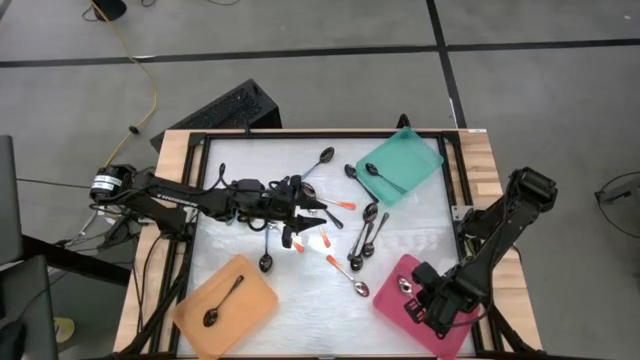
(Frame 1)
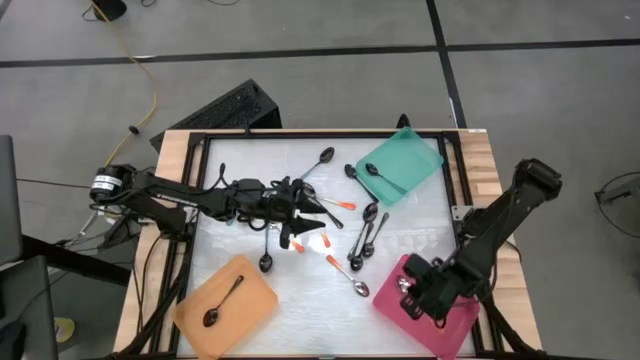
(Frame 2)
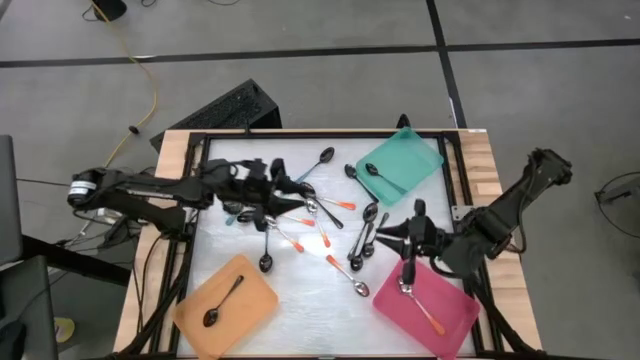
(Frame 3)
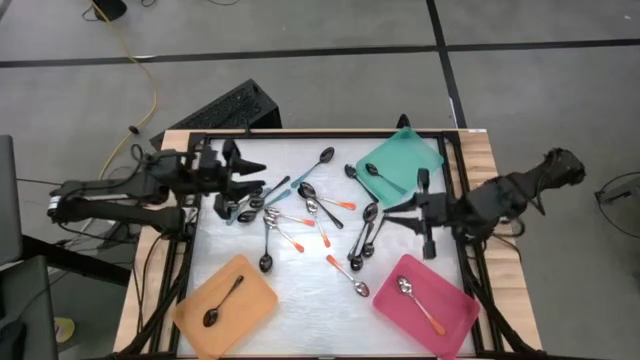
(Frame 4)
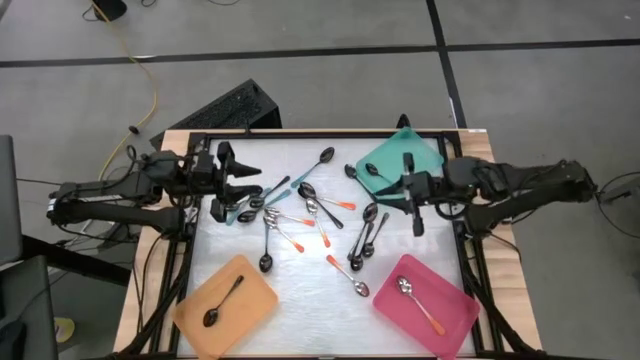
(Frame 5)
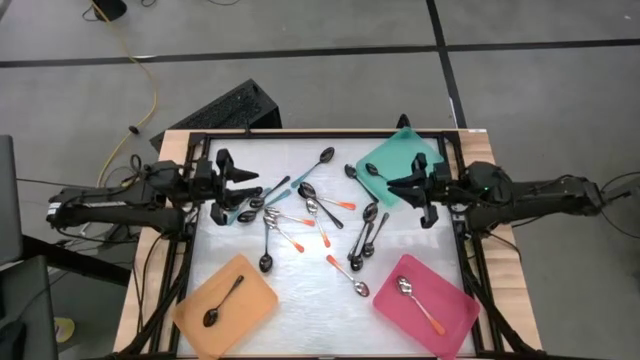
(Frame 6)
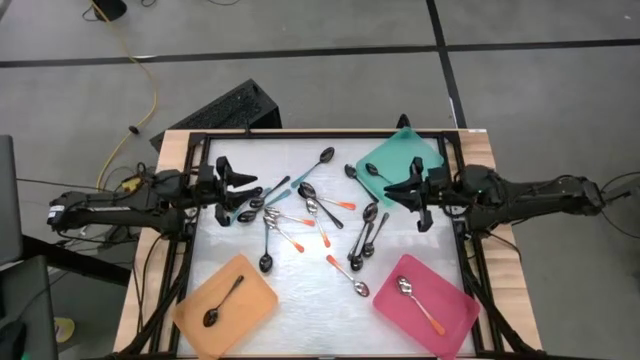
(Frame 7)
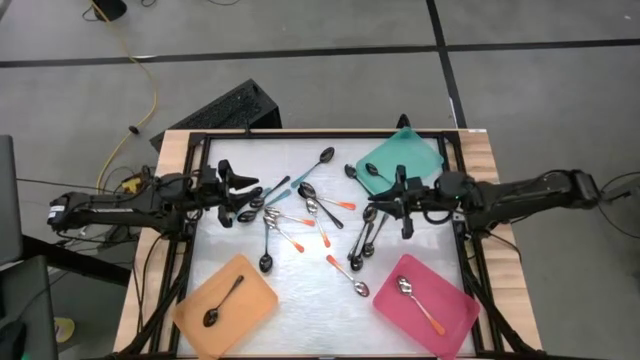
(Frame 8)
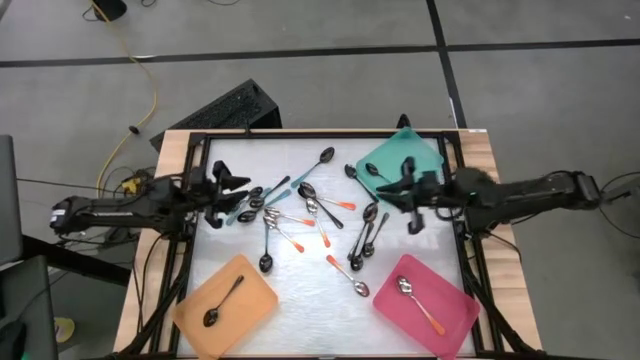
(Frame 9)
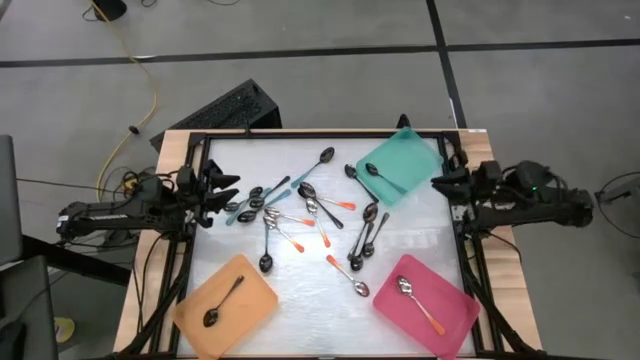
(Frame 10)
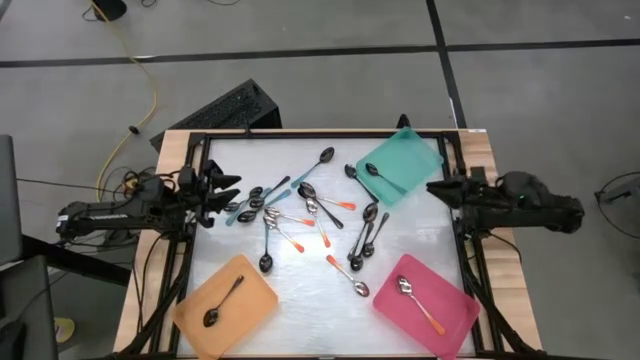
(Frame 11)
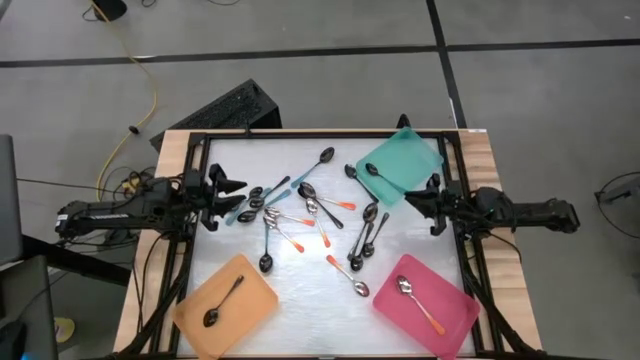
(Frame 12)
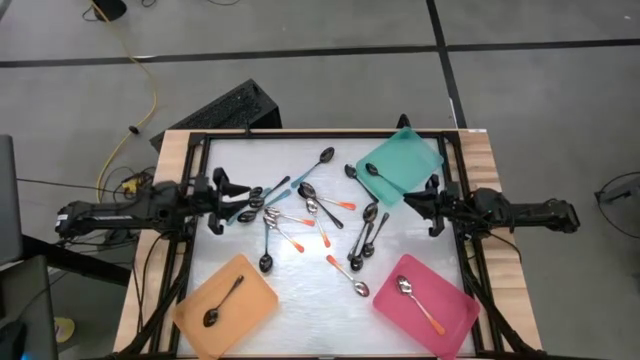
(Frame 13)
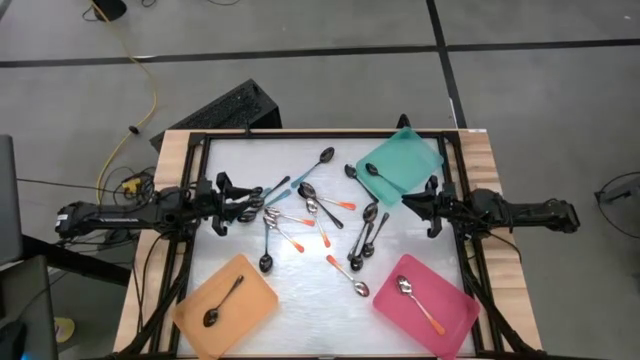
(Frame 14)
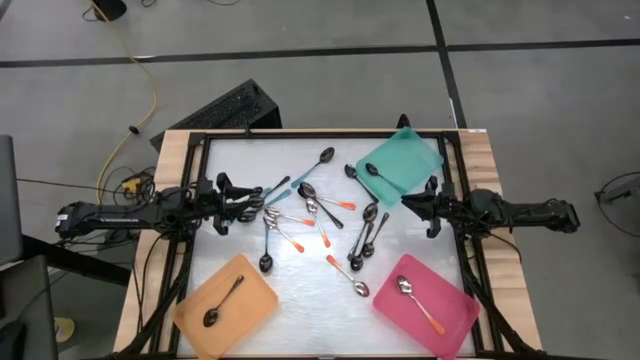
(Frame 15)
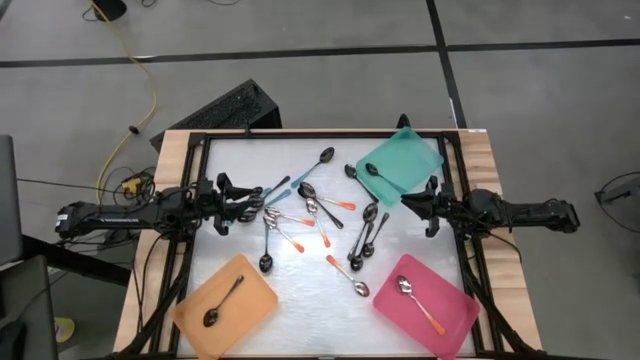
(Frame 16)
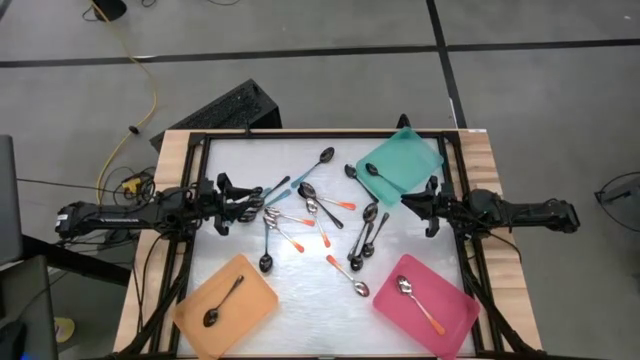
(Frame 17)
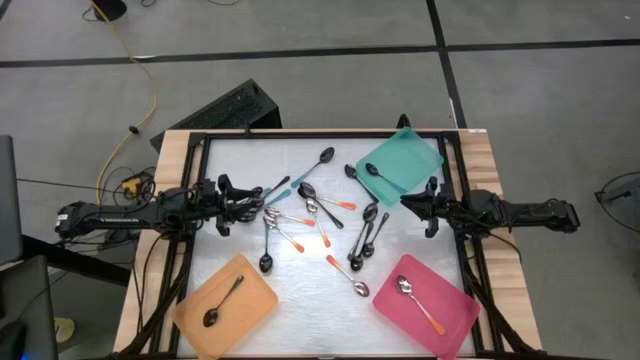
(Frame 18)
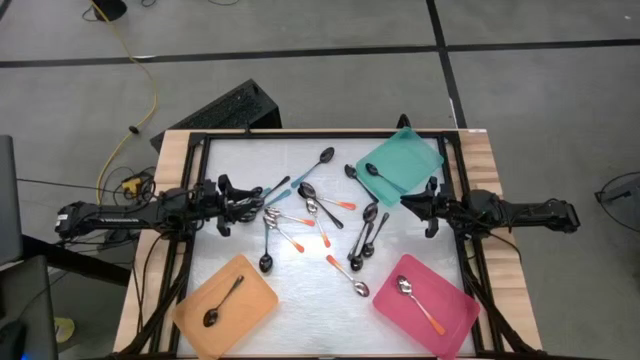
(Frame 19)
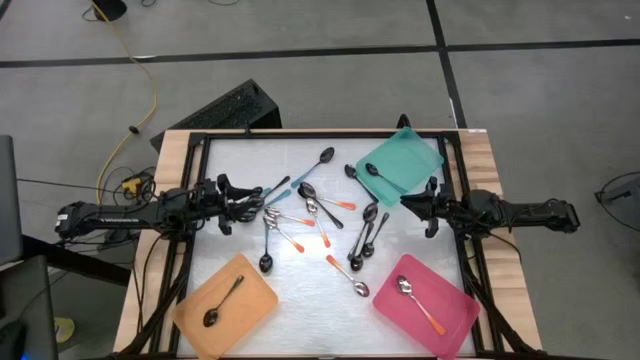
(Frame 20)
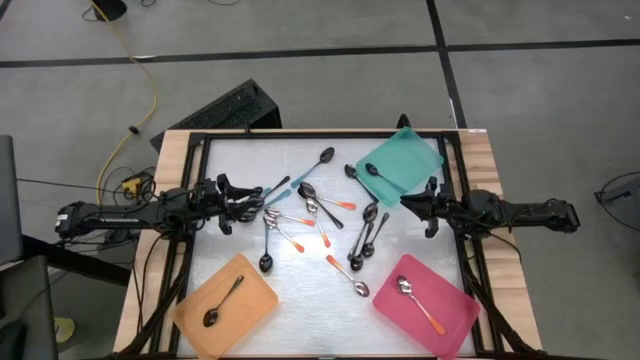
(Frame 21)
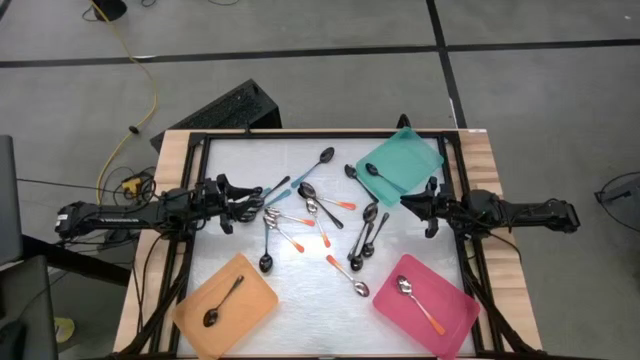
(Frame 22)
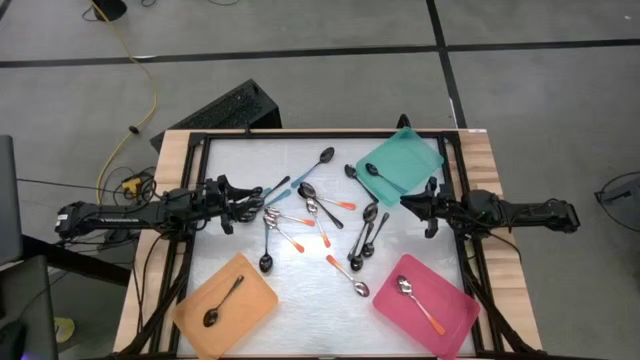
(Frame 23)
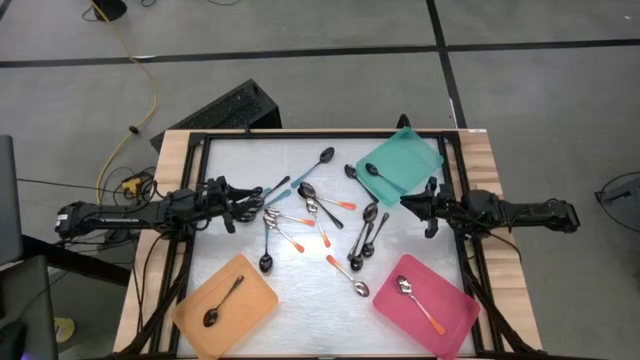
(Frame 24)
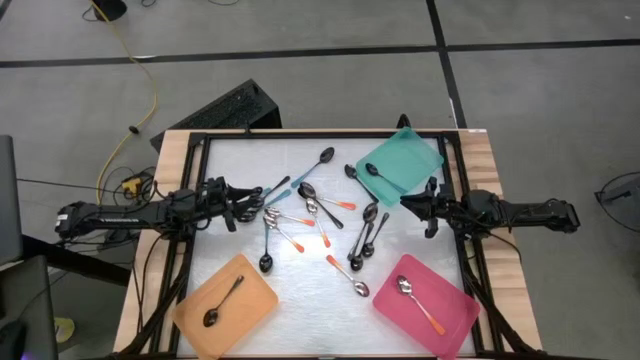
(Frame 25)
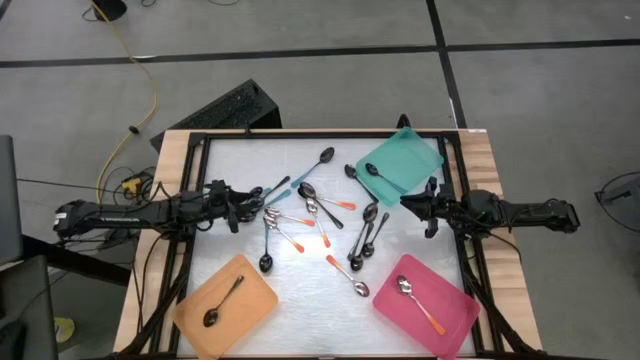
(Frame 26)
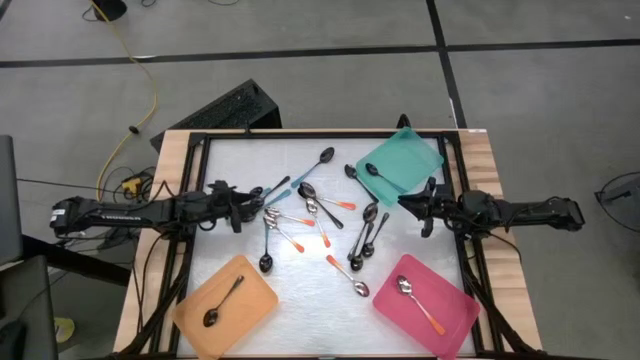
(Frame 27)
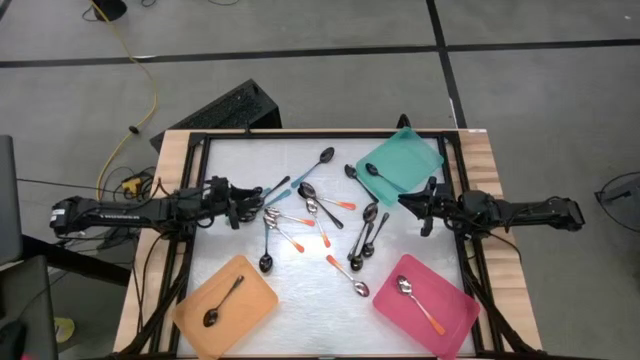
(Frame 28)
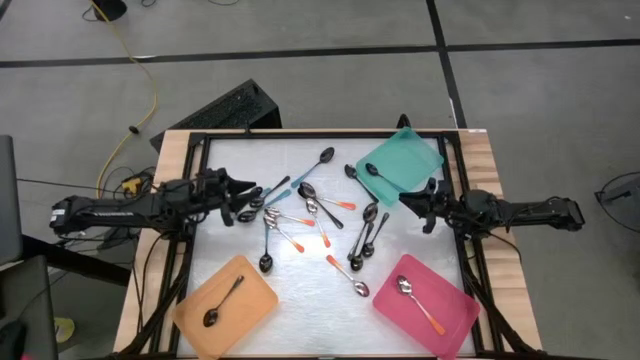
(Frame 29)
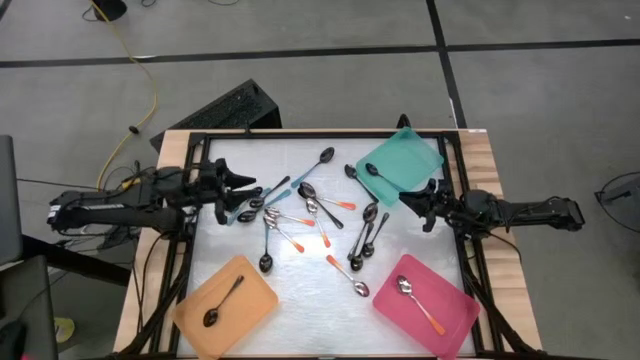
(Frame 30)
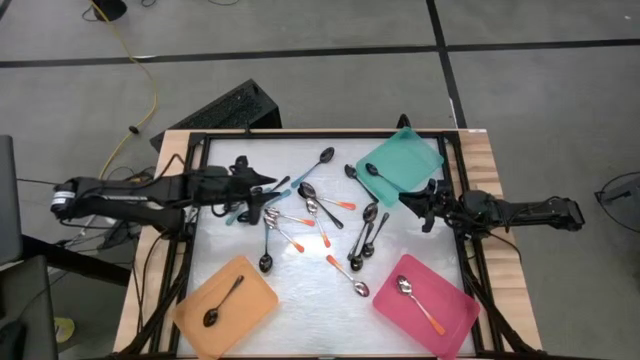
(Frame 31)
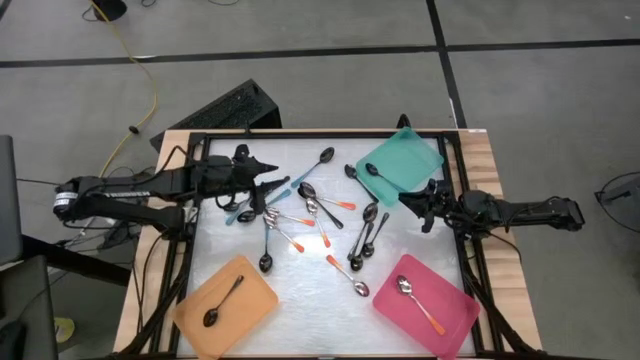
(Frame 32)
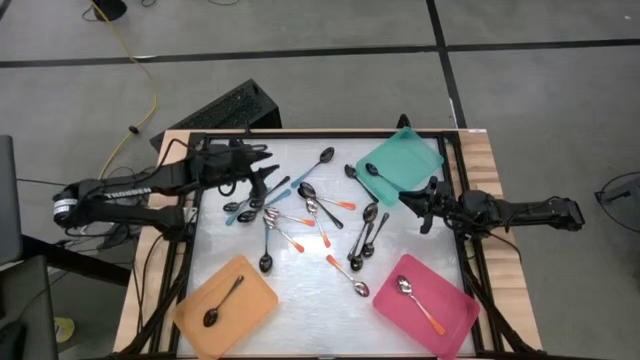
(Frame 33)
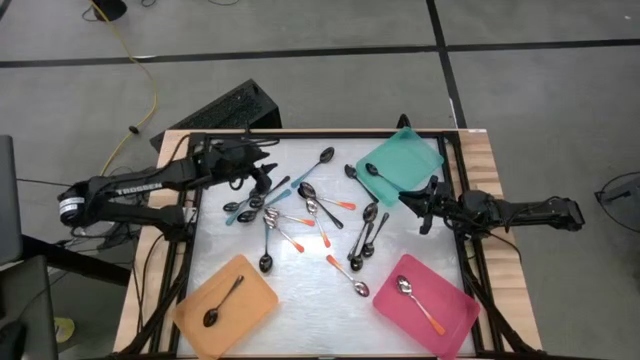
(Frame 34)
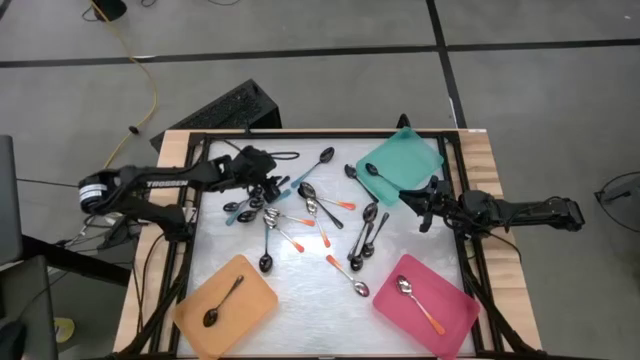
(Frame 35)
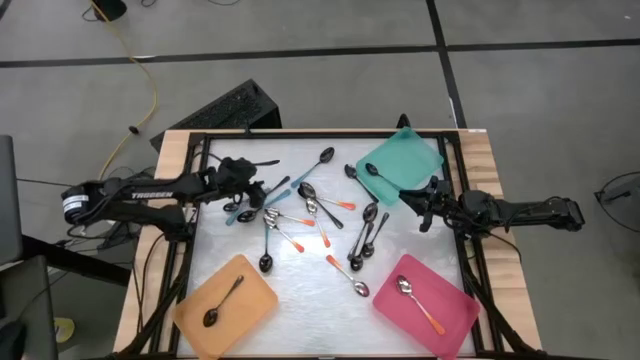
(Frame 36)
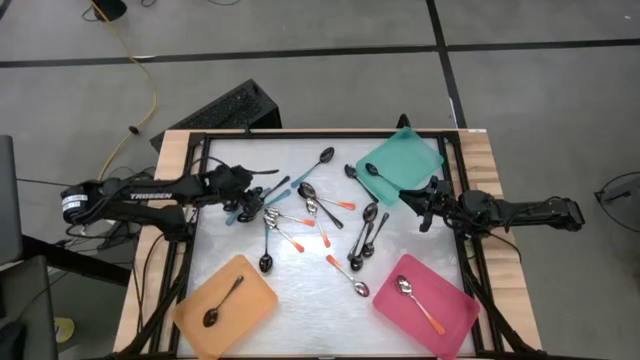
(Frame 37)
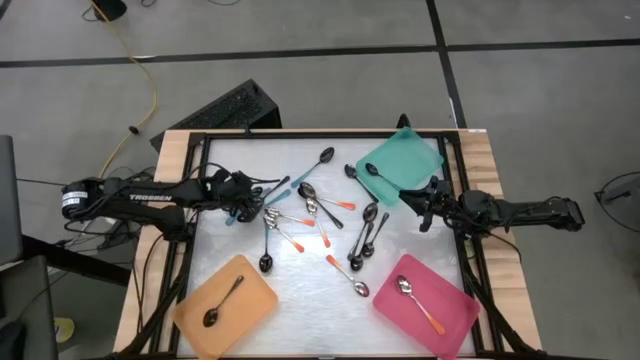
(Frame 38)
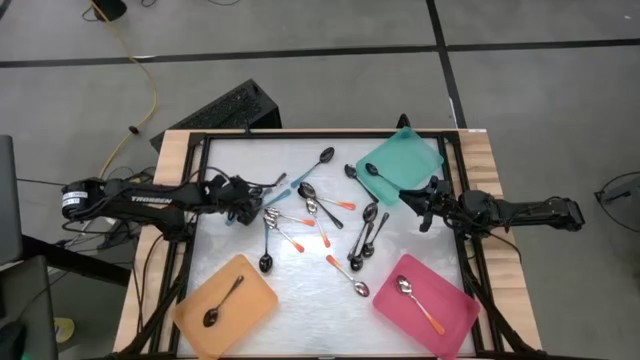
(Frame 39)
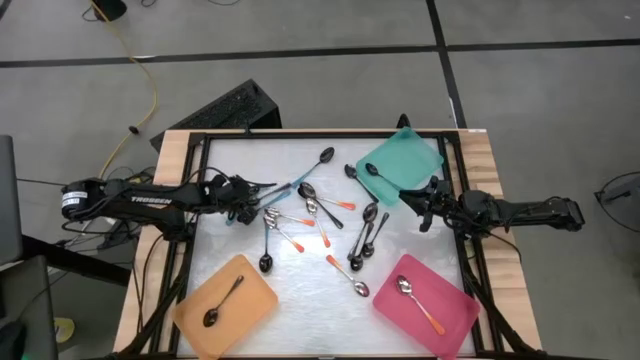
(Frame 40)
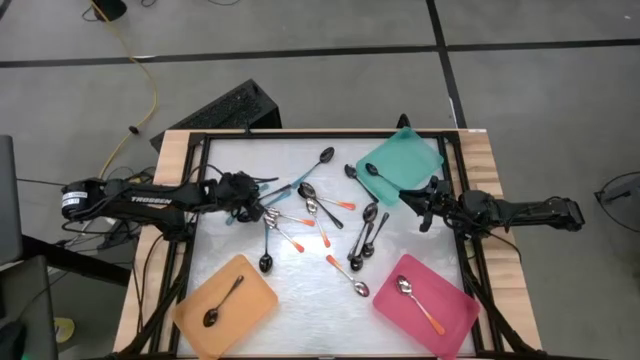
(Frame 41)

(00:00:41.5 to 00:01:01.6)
Task: Sort silverware by color (type)
Put the blue spoon into the blue bin
